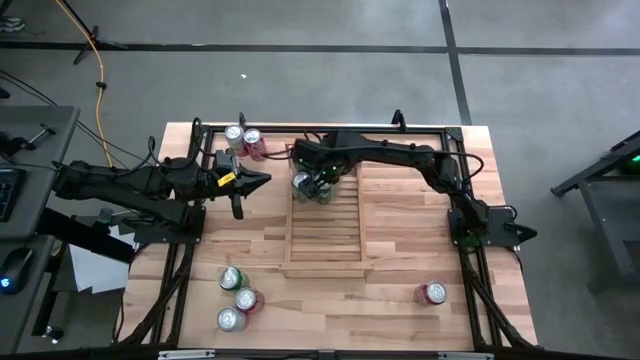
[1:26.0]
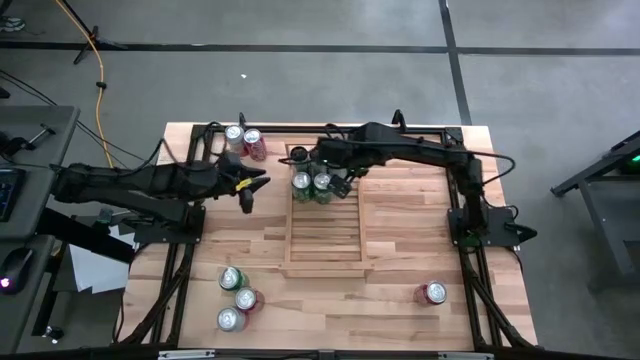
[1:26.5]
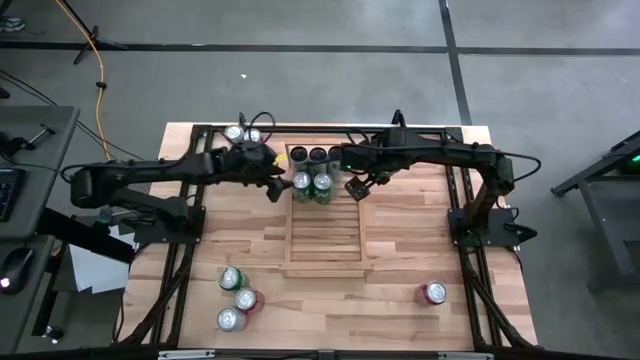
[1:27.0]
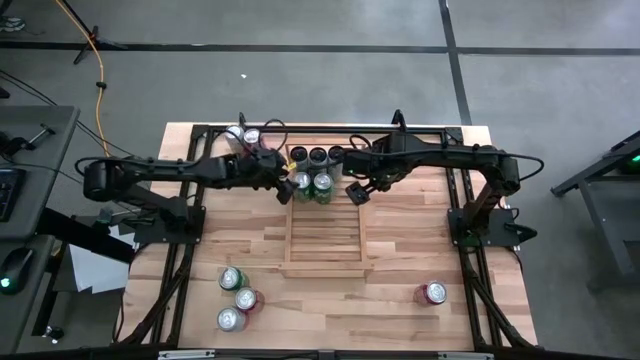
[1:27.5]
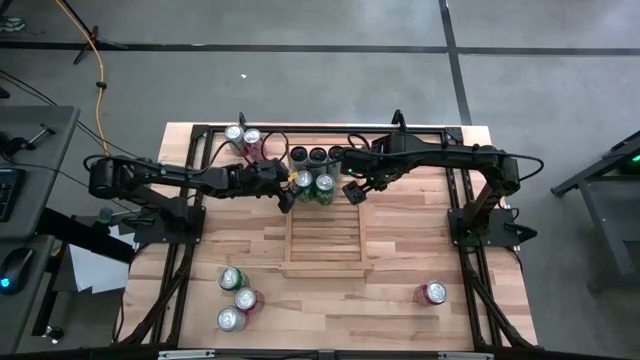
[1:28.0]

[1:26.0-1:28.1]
Task: Place canned beverage on shelf
Adjust the green can on the shelf

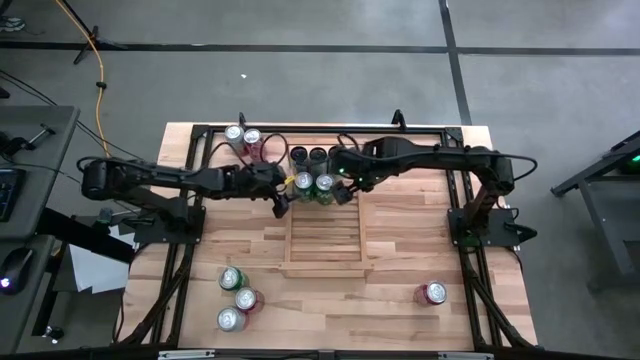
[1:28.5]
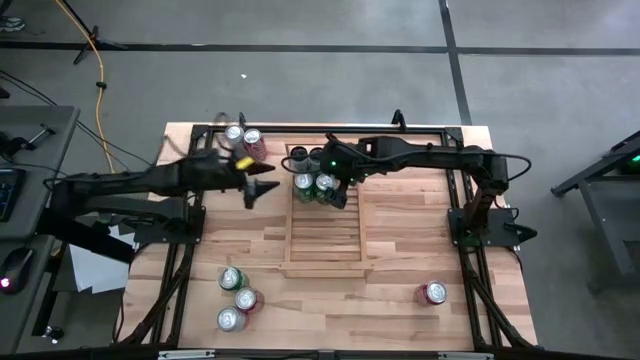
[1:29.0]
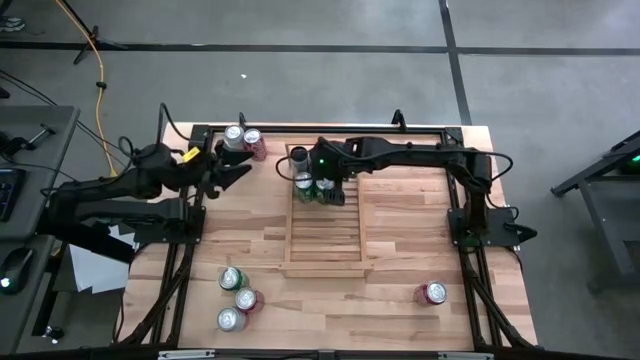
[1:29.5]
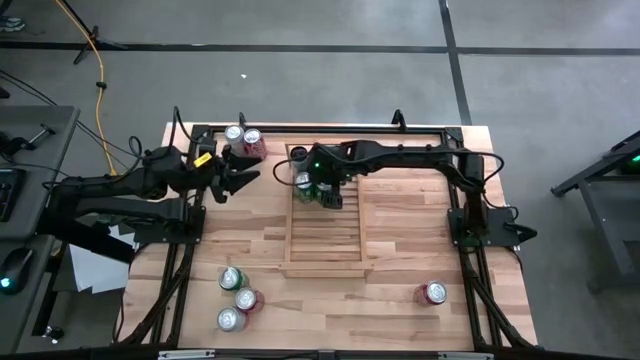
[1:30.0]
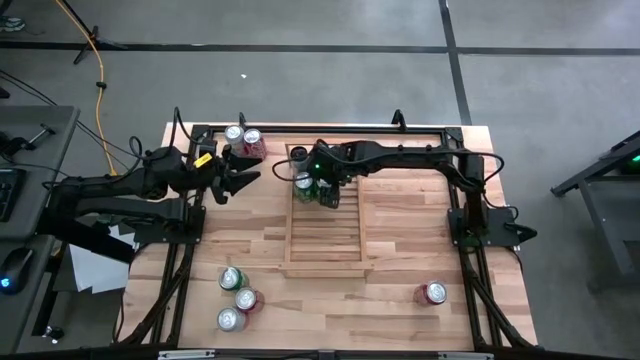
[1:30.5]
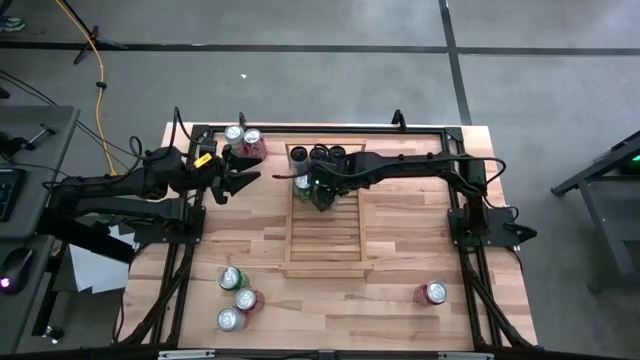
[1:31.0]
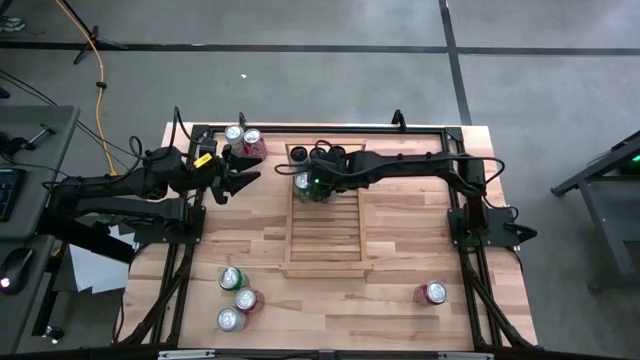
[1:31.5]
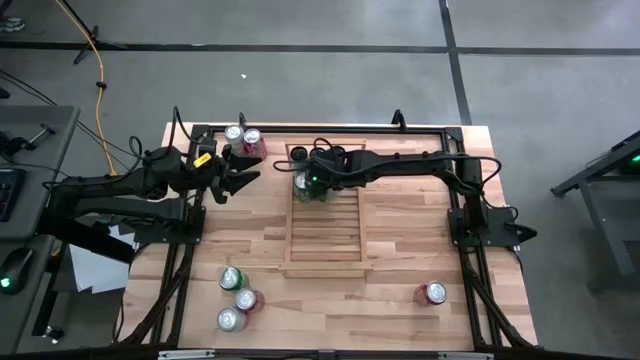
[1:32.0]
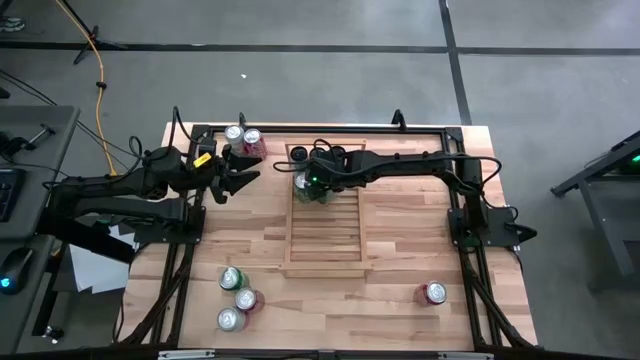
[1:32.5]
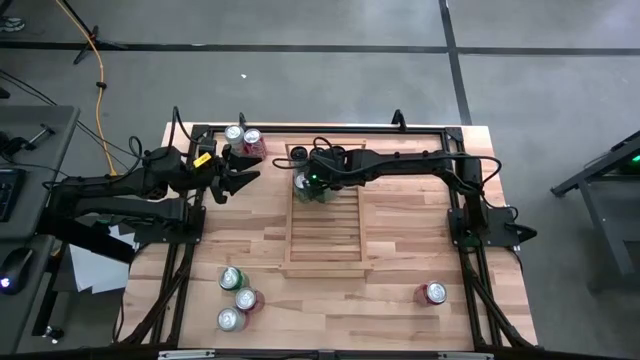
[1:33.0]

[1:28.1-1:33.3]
Adjust the green can on the shelf

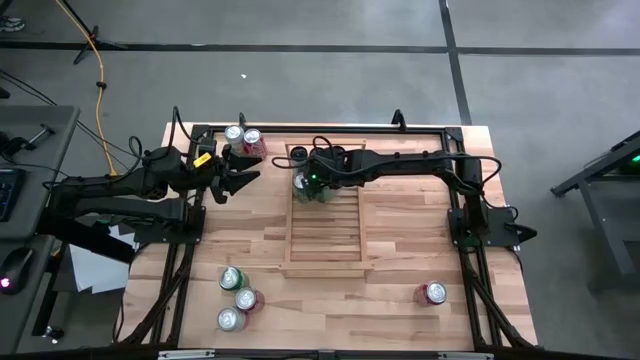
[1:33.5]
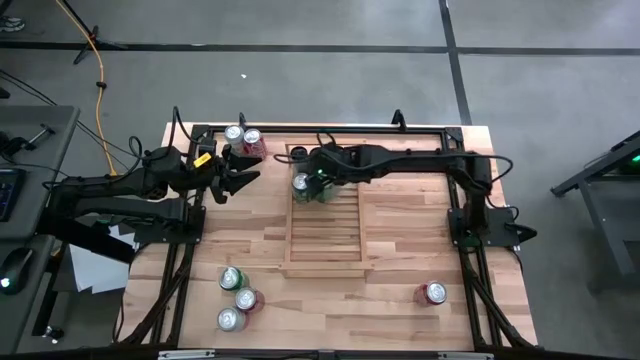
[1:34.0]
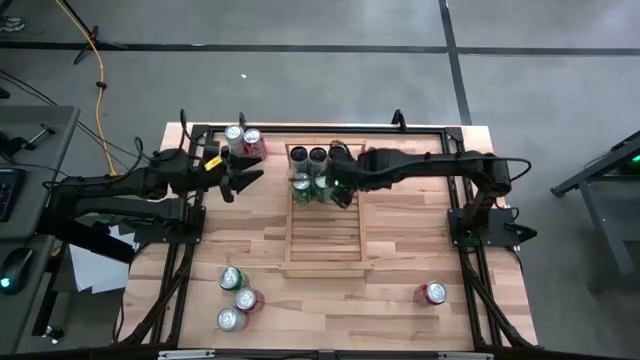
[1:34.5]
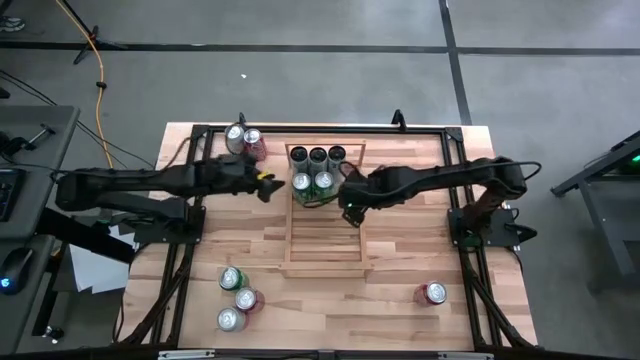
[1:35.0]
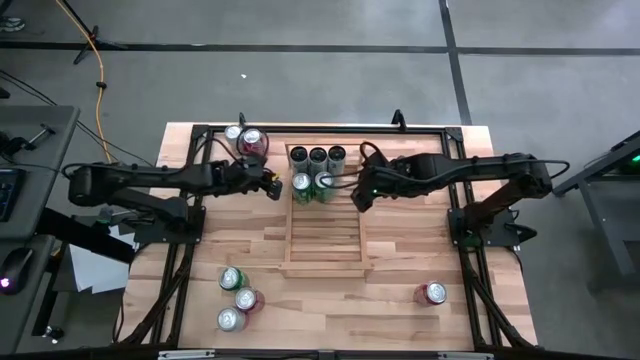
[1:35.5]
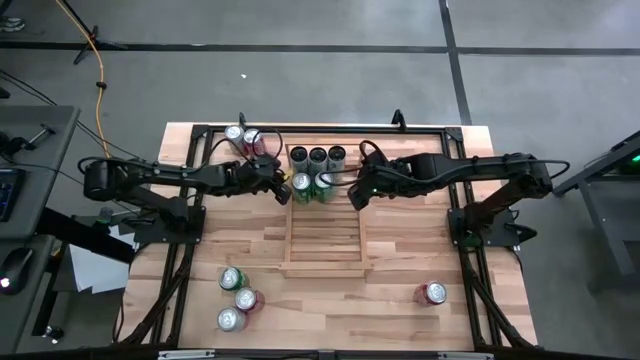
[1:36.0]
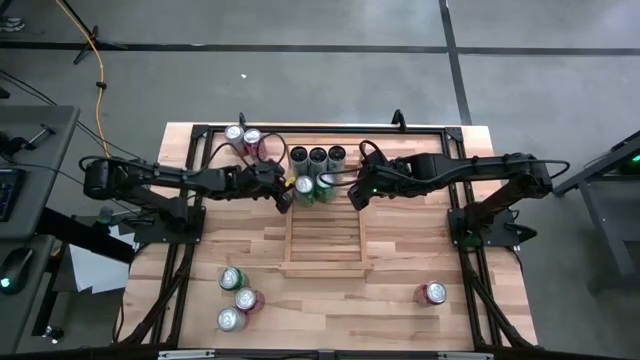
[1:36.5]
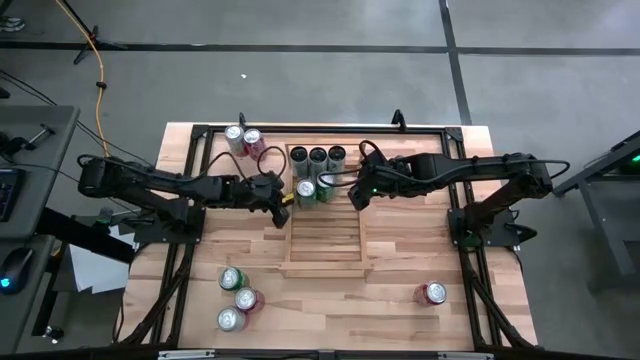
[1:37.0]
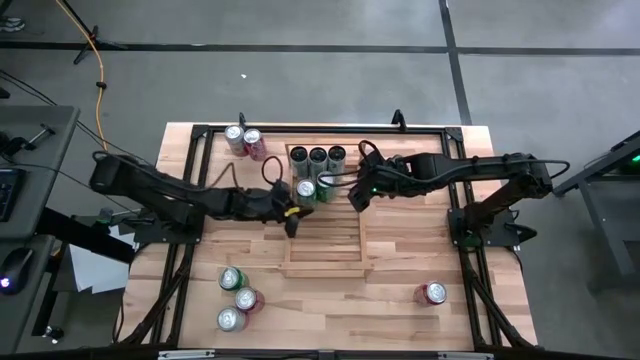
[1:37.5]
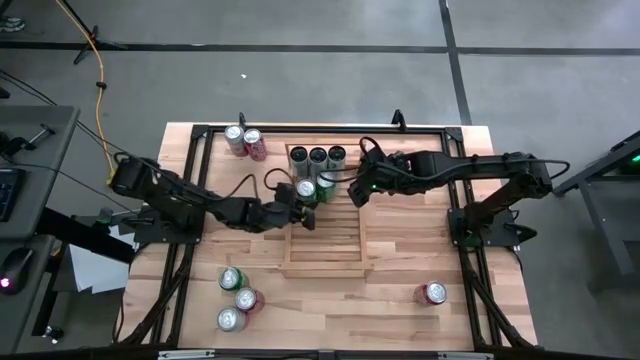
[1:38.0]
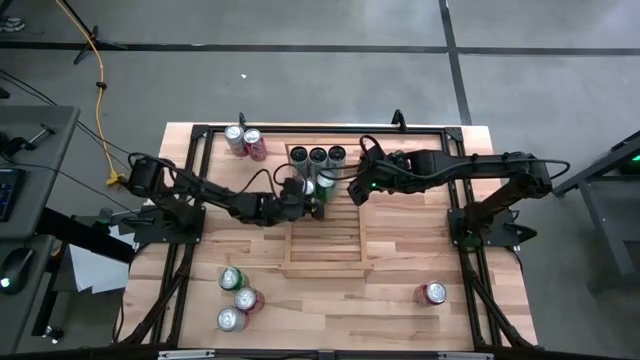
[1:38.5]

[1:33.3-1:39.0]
Adjust the green can on the shelf

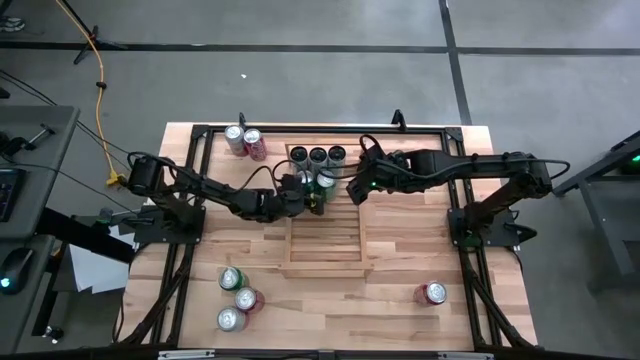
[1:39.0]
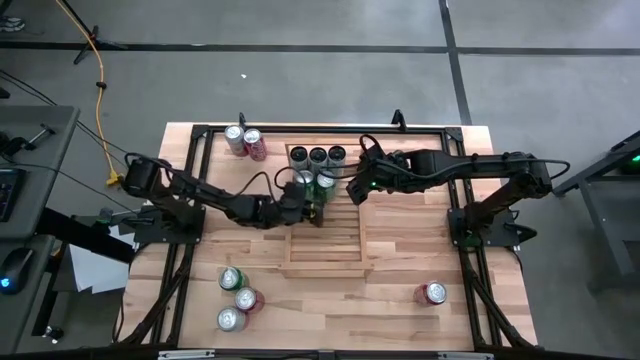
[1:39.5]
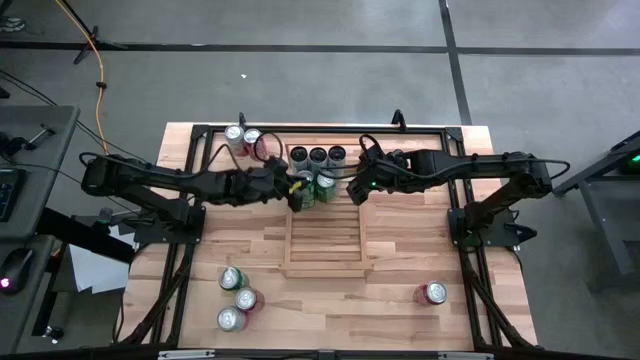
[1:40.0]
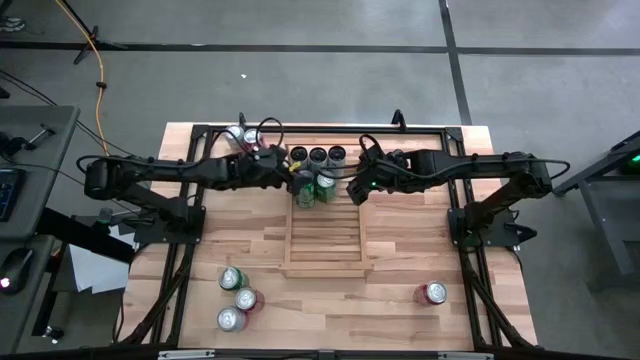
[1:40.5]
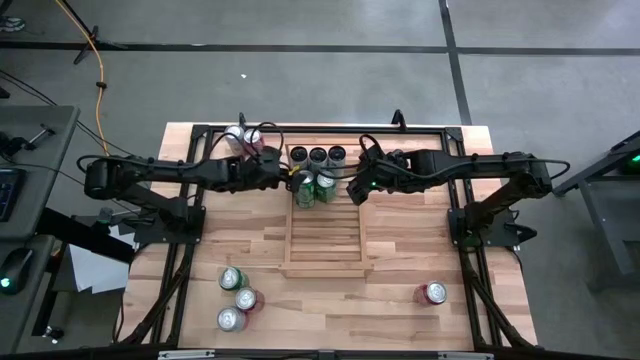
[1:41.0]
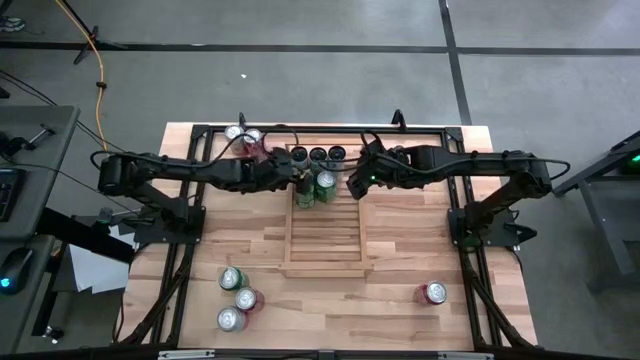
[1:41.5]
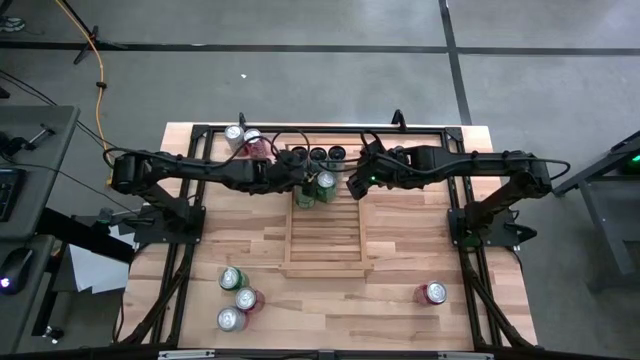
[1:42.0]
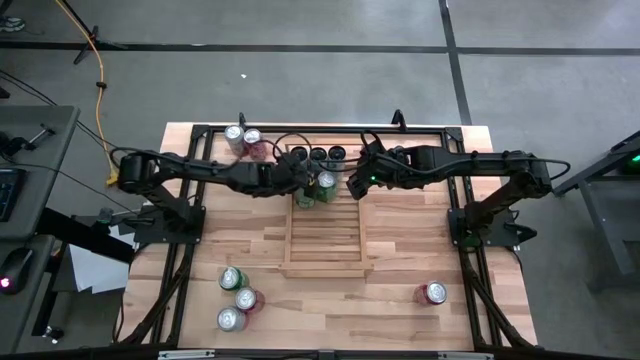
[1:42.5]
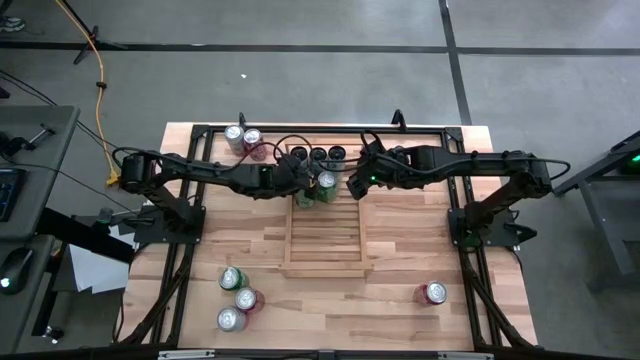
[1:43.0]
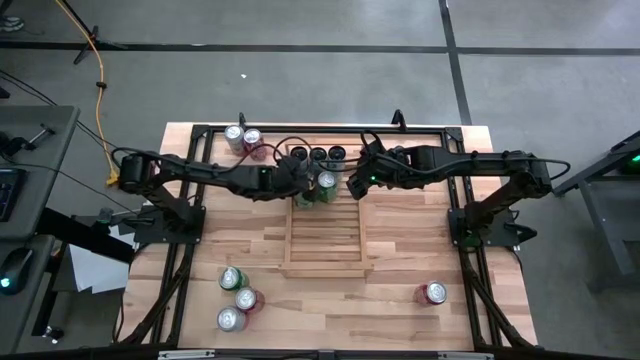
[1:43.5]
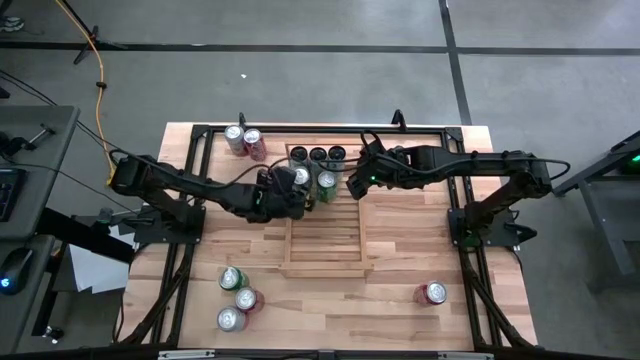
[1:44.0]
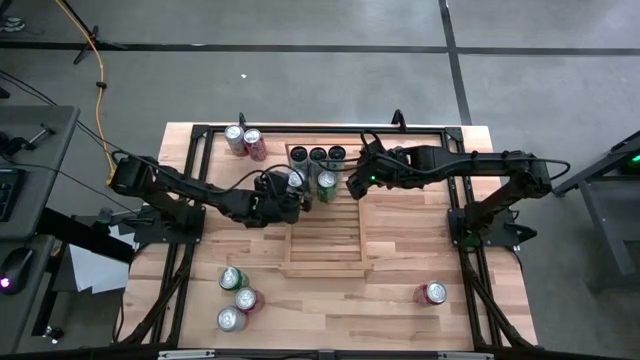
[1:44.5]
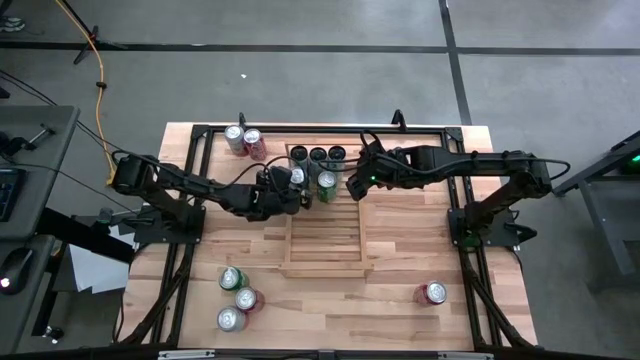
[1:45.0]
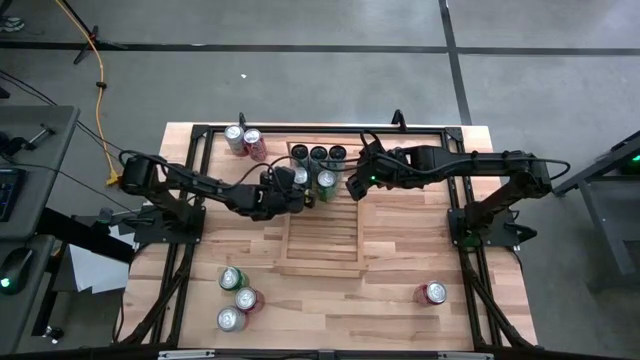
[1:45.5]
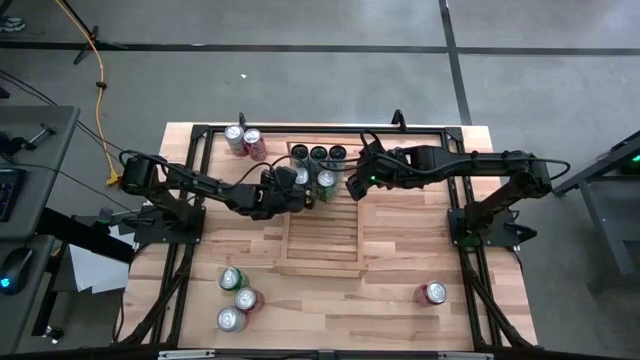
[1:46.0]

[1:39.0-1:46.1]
Adjust the green can on the shelf
